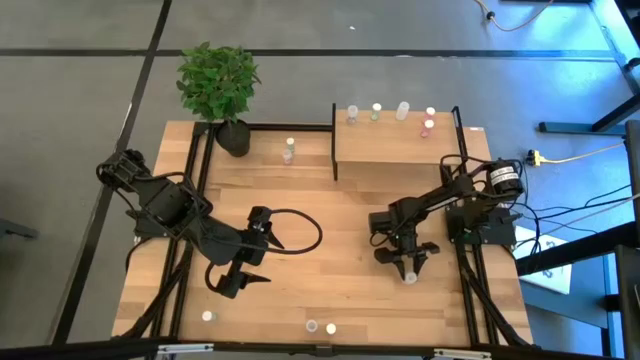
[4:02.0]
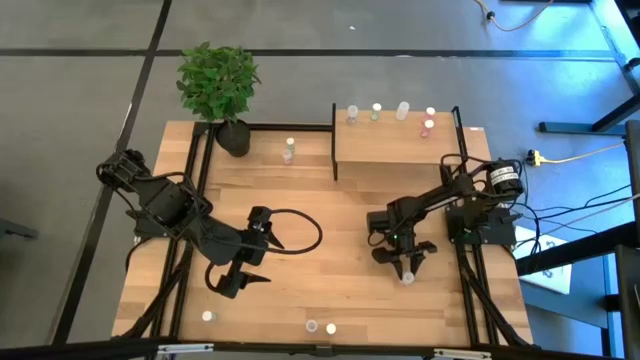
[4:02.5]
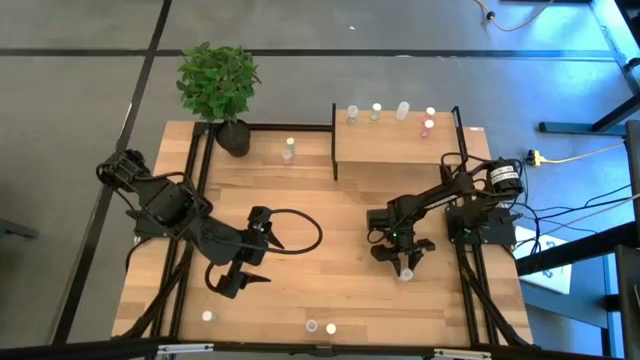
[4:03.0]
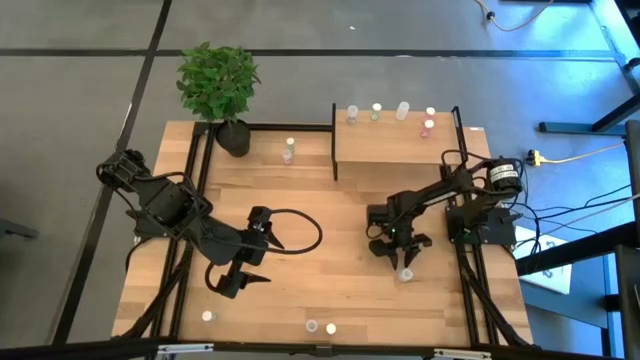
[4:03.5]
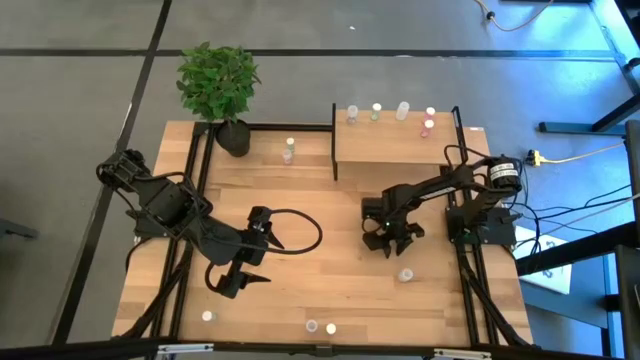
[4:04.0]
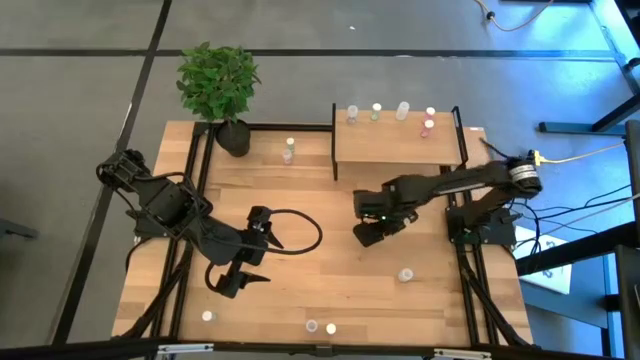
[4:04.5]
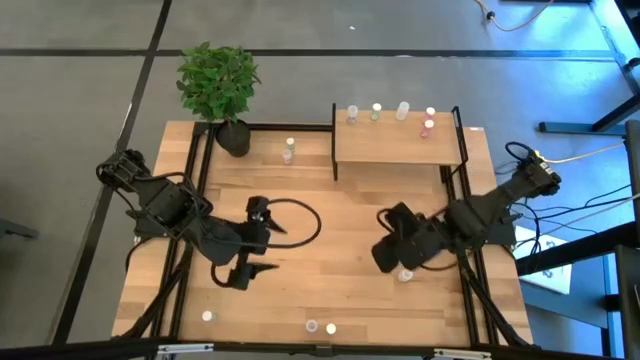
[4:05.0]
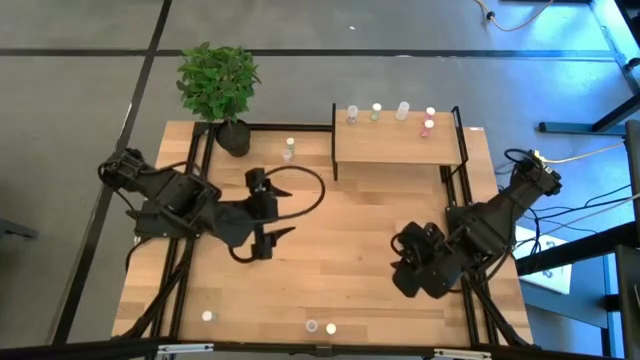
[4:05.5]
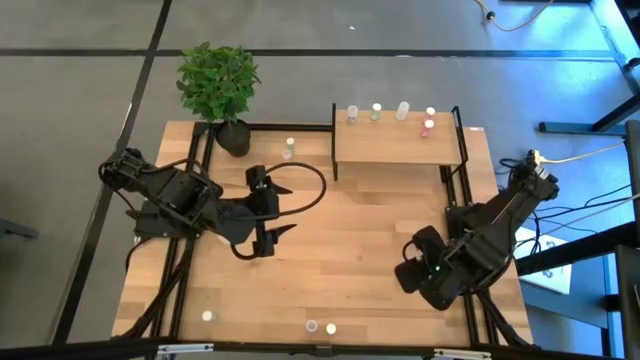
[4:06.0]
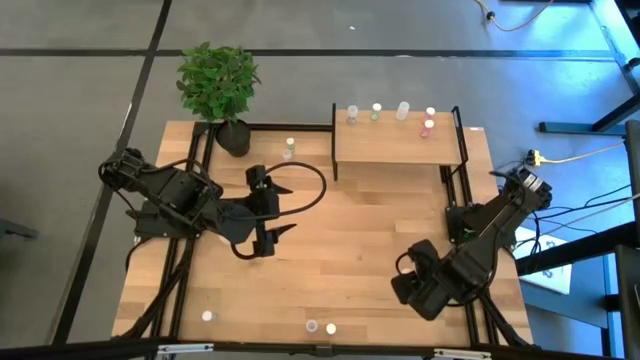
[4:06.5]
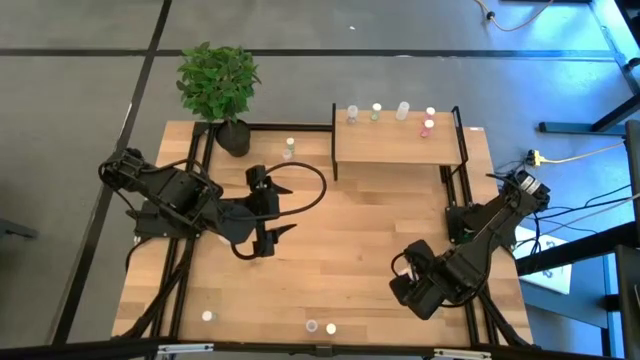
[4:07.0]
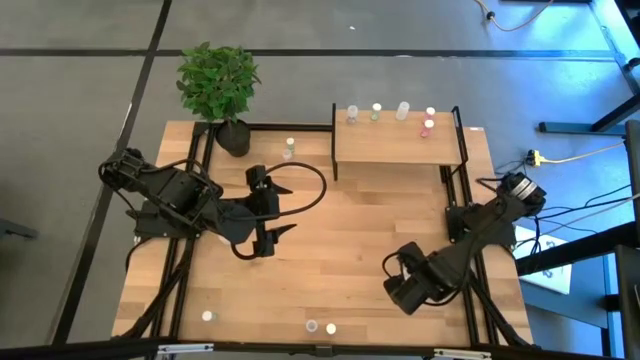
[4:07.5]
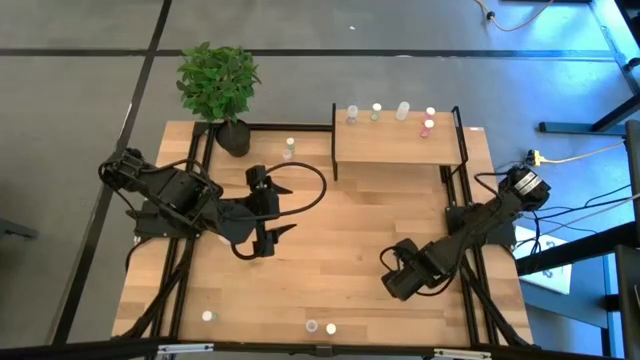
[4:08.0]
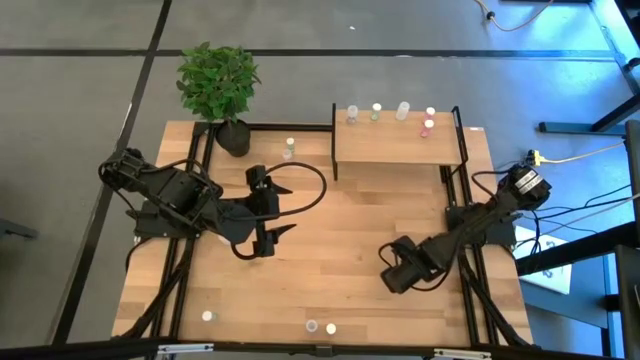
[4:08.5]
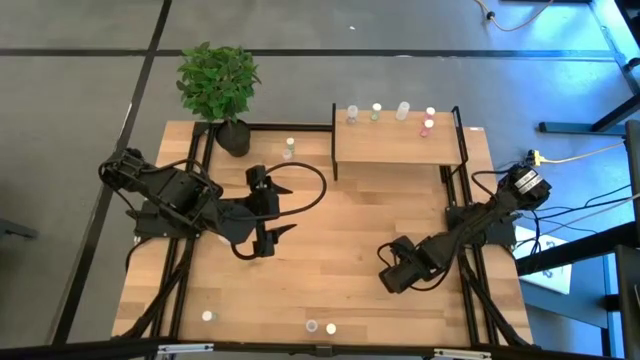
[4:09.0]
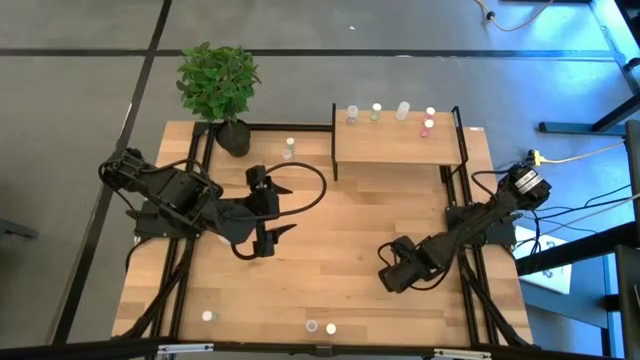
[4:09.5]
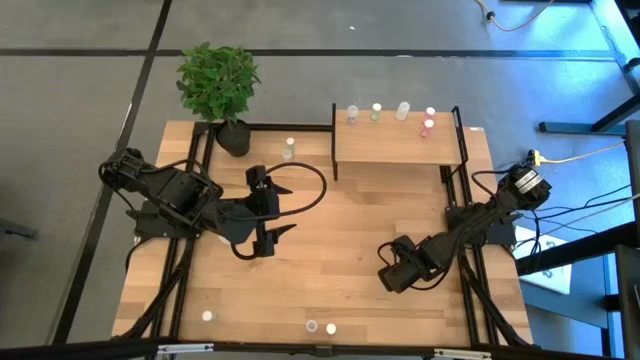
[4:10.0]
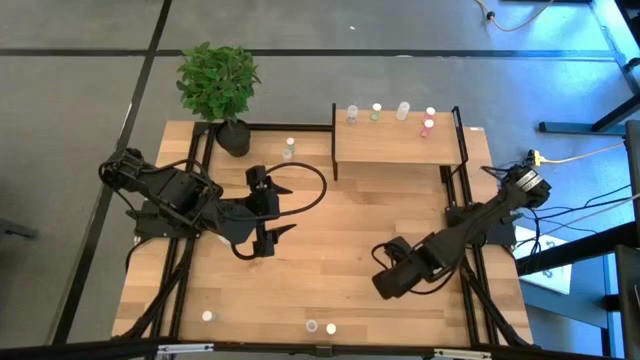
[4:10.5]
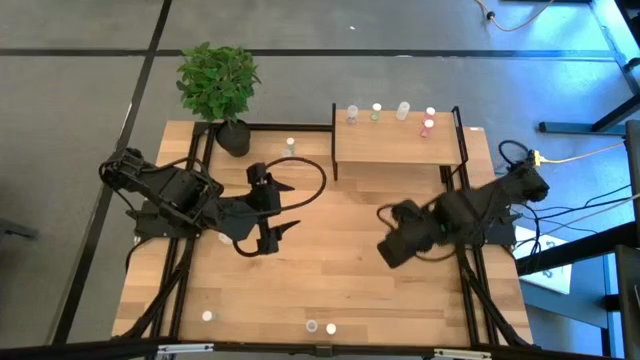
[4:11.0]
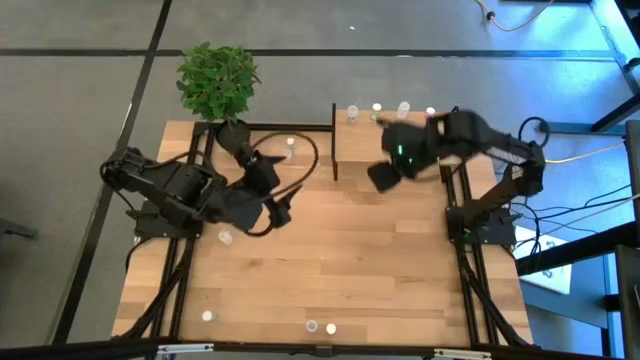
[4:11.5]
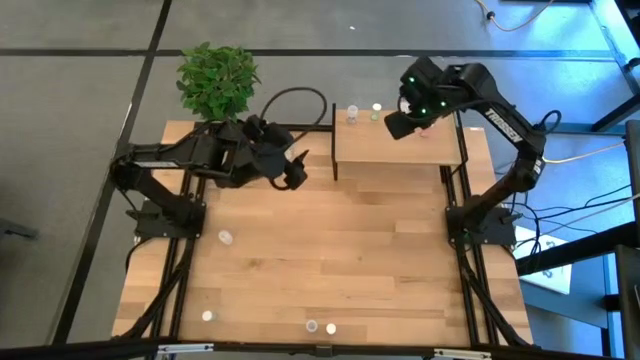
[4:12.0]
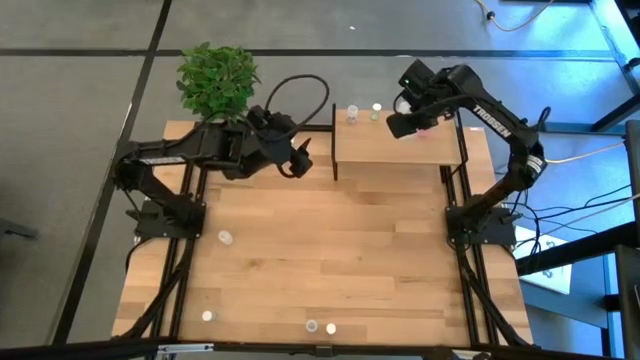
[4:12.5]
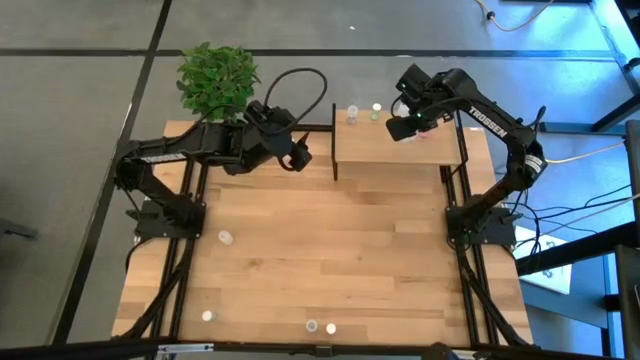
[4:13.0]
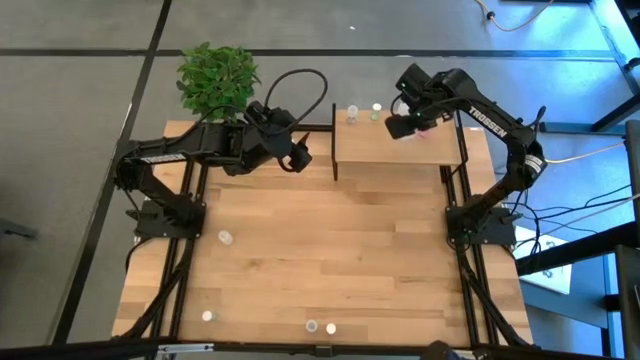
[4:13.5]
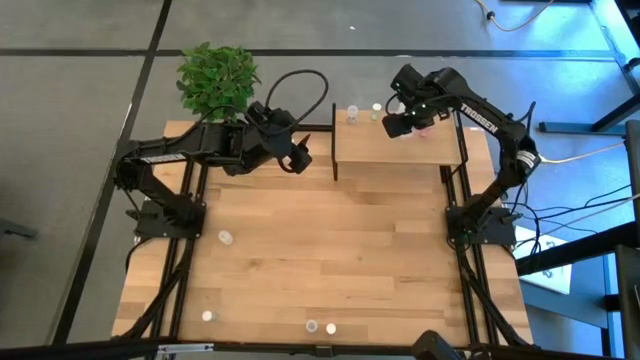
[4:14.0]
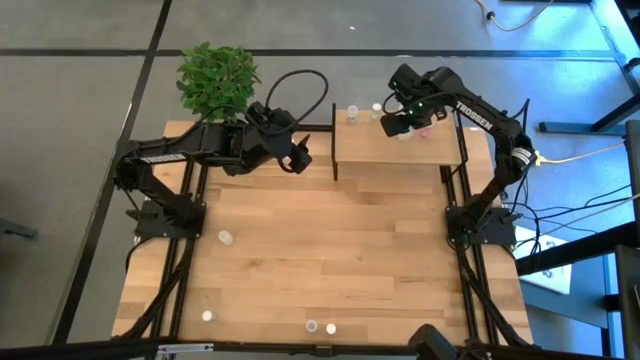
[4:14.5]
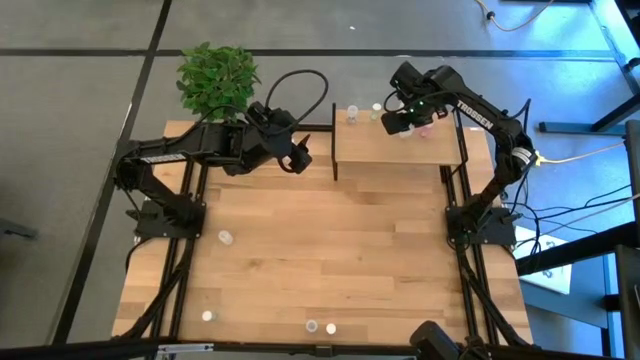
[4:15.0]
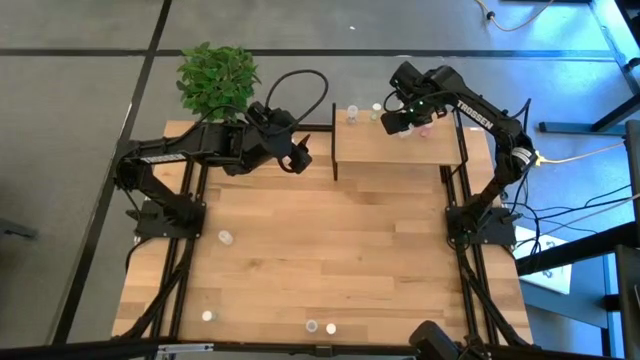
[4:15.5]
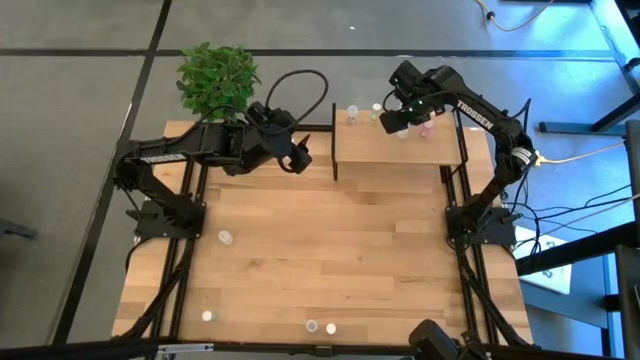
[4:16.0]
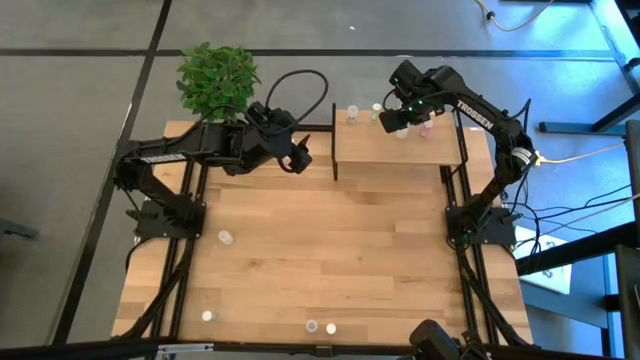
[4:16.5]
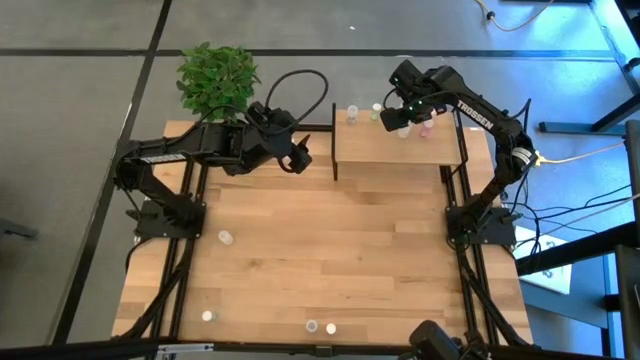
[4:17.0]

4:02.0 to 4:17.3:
Task: Pick and place medicine bottles onto shelf by color
Put the bottom white pill bottle aligned with the other white pill bottle on the shelf
